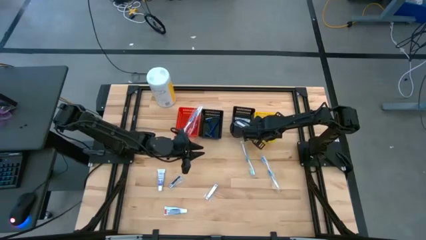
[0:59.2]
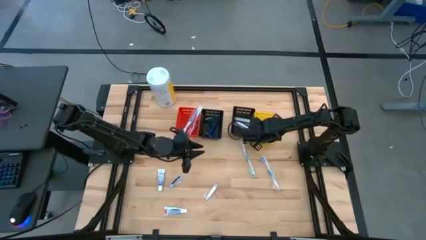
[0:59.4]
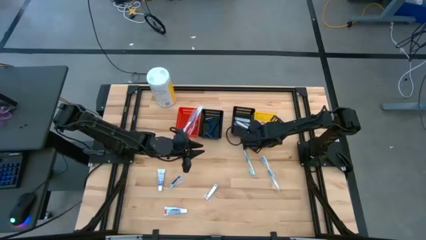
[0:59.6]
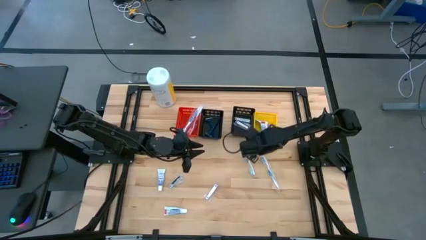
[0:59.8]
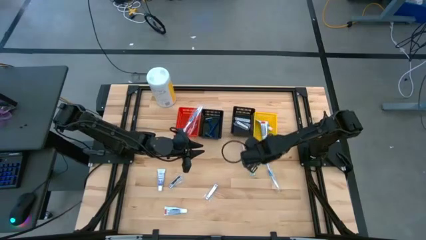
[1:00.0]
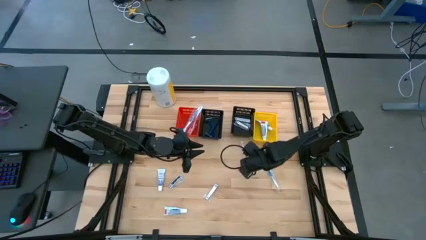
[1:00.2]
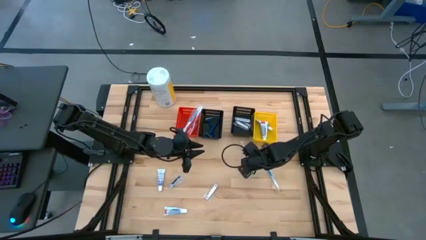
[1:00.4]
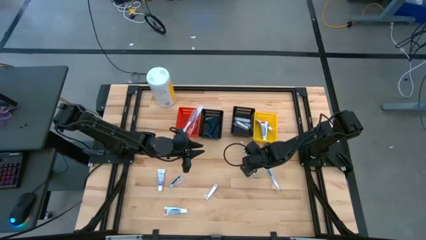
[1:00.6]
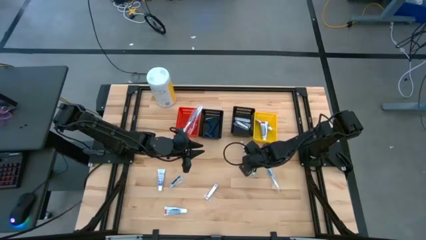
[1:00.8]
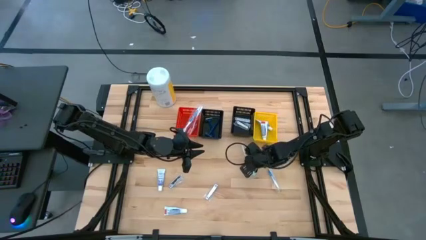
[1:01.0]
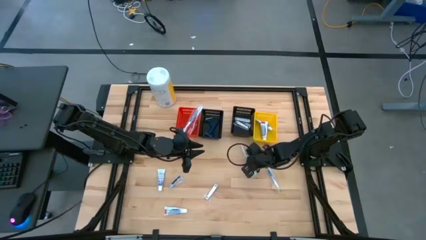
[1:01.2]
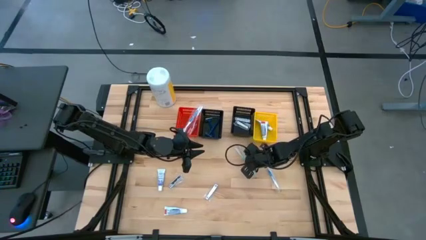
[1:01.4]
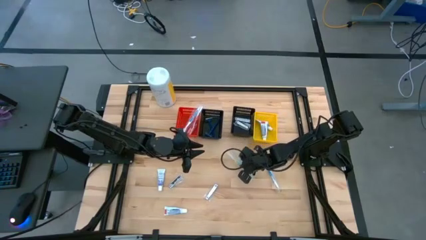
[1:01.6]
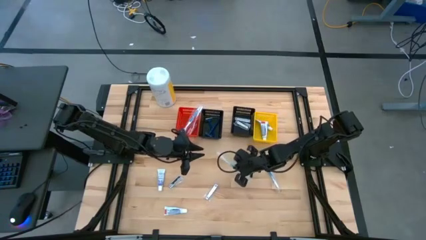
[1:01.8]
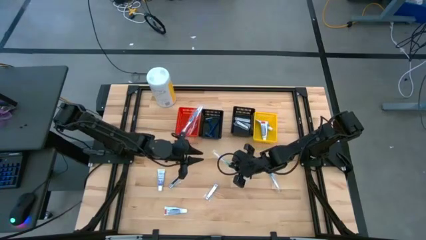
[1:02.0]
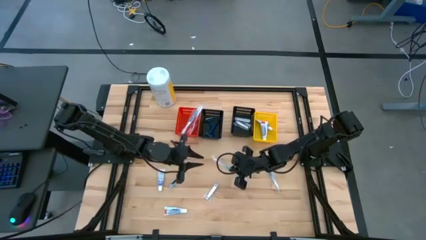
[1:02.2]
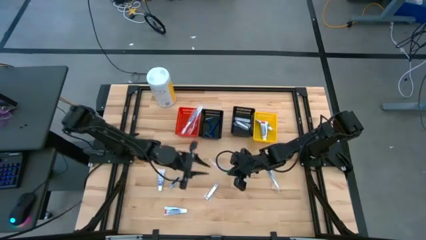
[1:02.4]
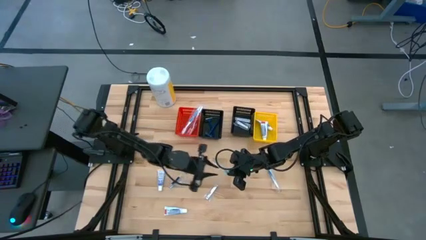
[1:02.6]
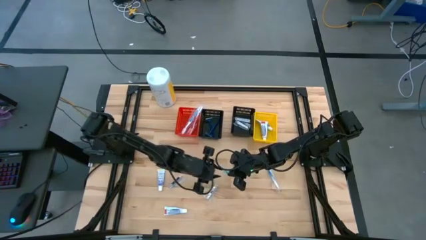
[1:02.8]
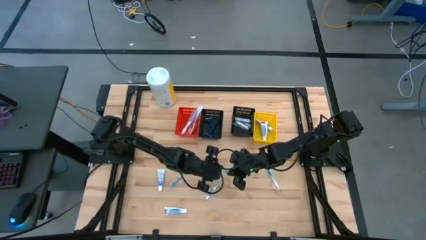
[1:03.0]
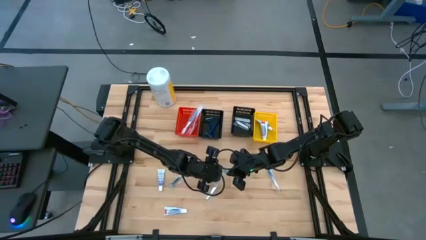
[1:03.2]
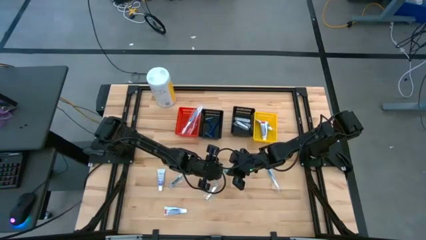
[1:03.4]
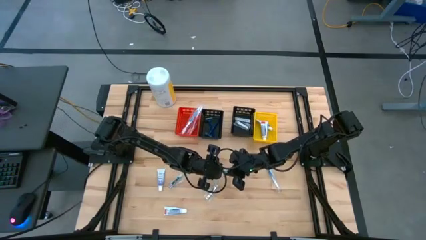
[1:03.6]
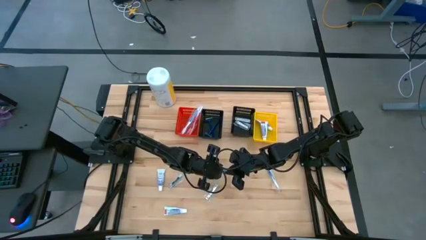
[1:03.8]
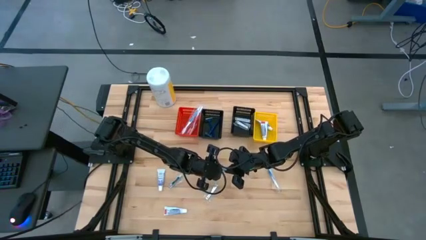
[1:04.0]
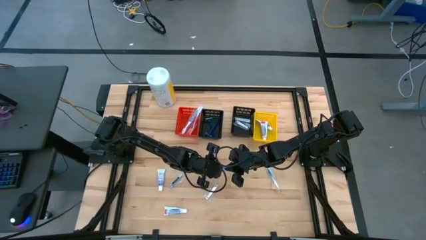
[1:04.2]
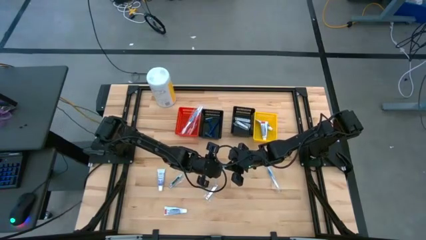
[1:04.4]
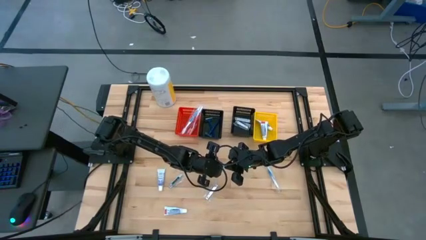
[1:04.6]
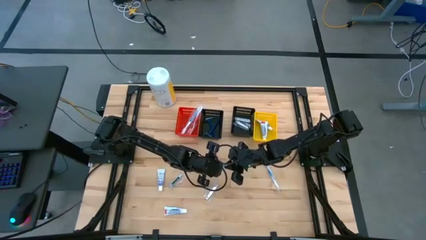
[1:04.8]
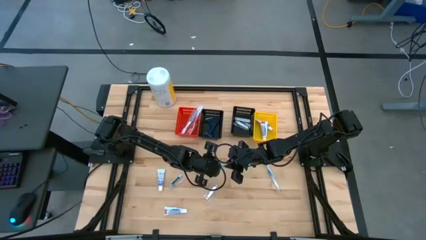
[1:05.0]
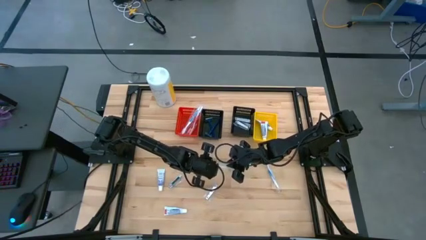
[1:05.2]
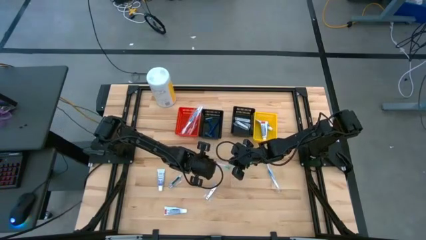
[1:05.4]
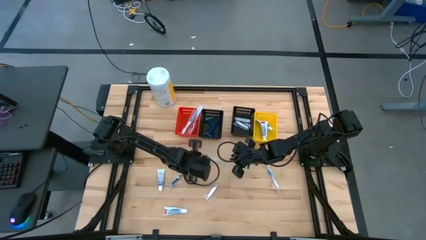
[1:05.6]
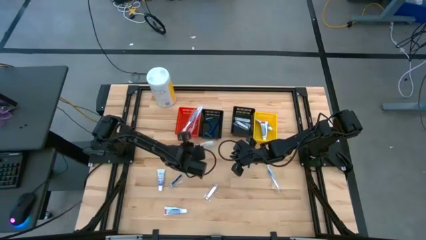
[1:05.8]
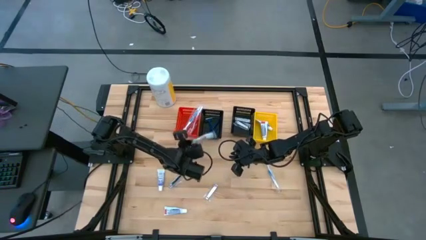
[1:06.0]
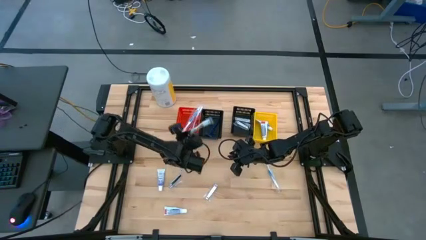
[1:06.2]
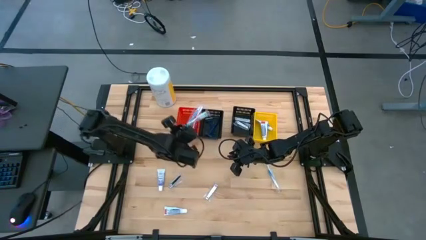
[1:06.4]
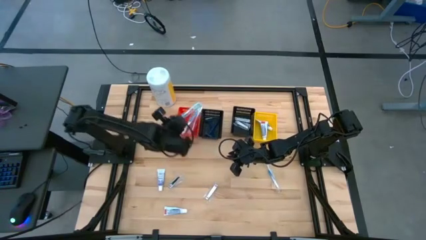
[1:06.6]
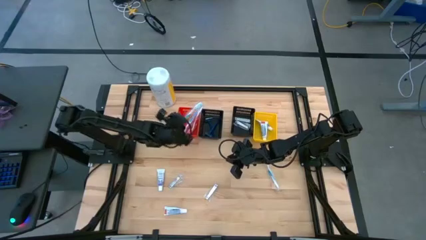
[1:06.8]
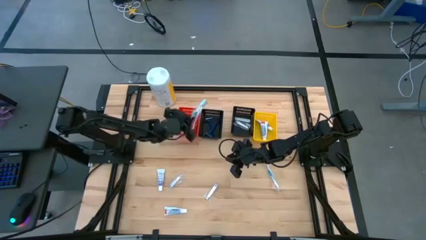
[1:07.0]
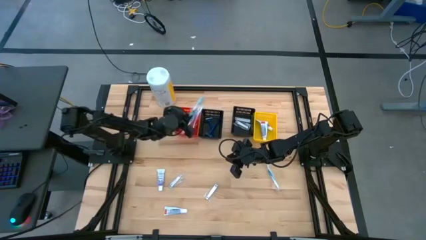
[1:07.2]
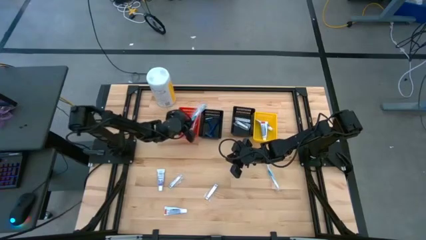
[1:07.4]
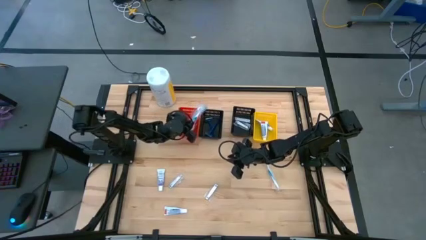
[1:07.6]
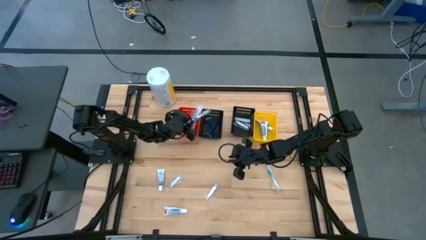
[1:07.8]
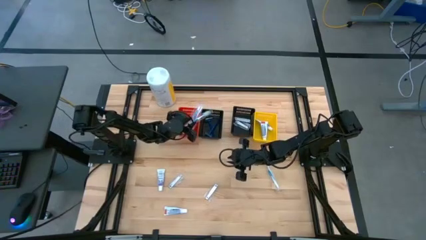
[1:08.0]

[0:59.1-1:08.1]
Task: Pick & Place Travel size toiletries
Put the green toothbrush into the red basket

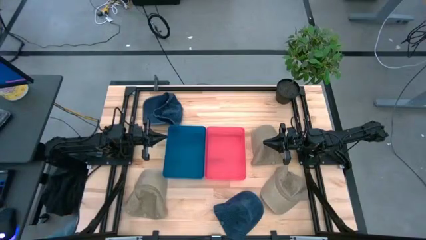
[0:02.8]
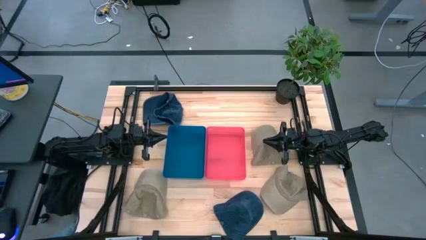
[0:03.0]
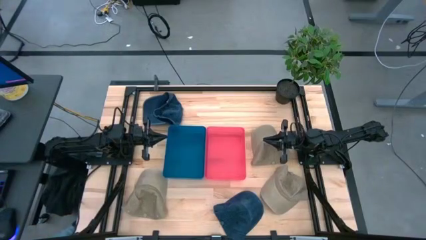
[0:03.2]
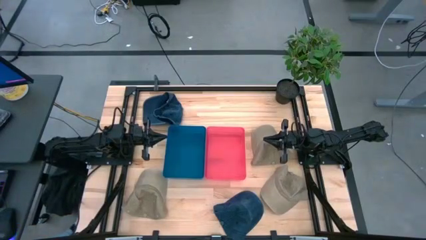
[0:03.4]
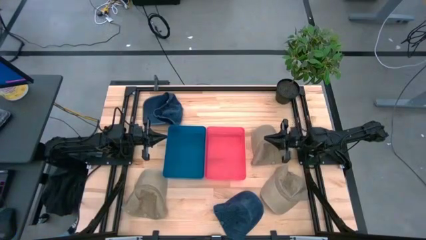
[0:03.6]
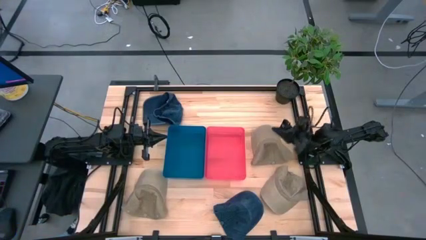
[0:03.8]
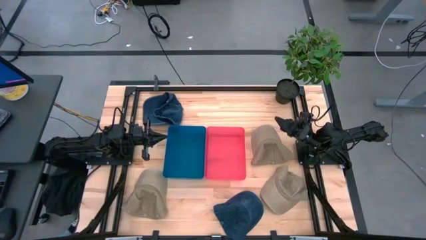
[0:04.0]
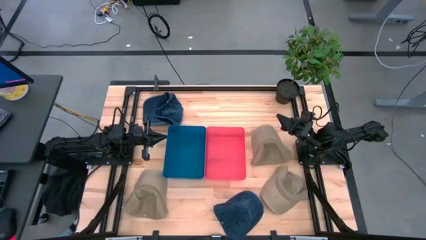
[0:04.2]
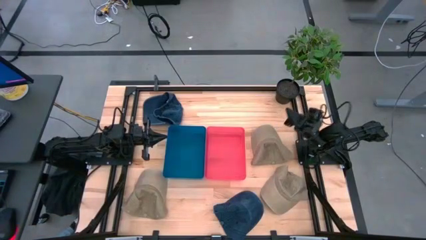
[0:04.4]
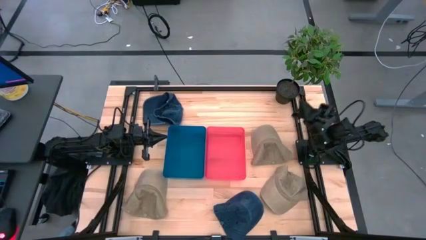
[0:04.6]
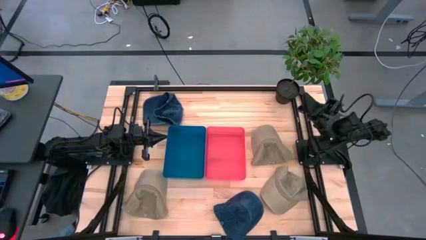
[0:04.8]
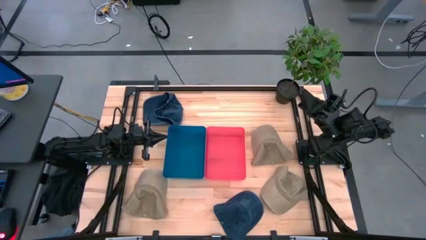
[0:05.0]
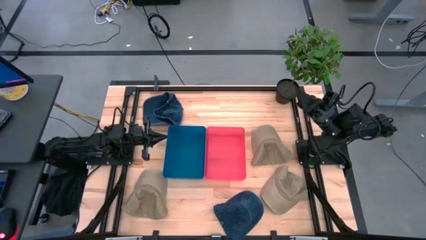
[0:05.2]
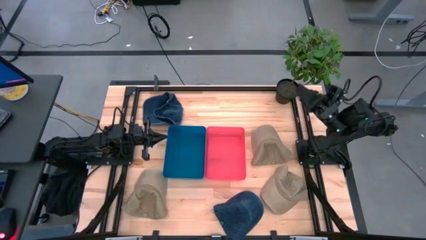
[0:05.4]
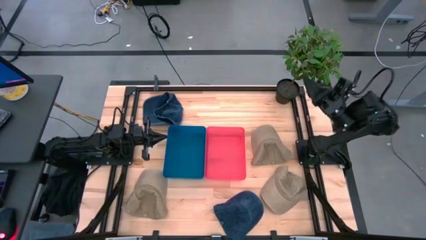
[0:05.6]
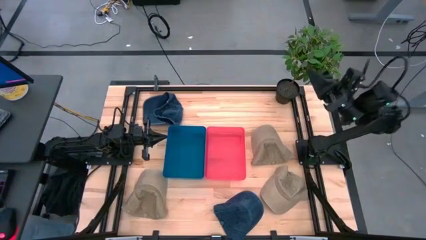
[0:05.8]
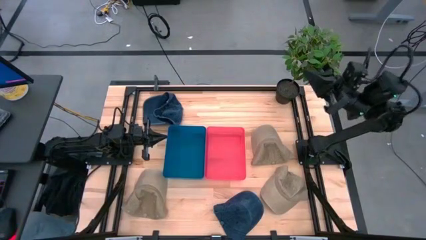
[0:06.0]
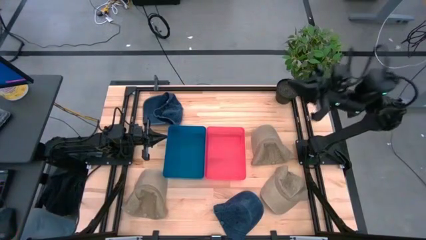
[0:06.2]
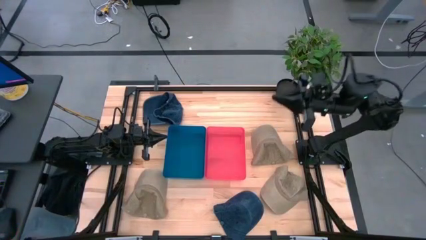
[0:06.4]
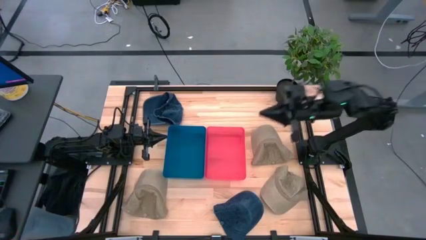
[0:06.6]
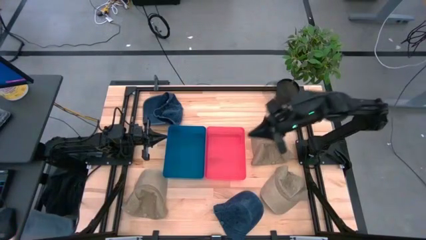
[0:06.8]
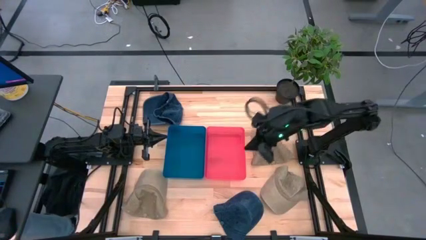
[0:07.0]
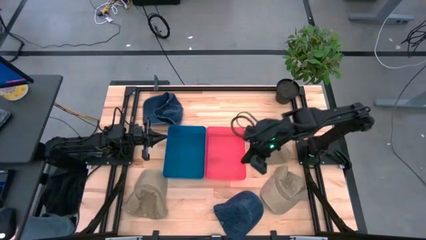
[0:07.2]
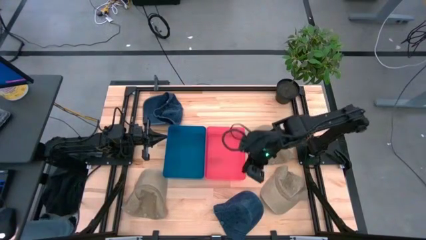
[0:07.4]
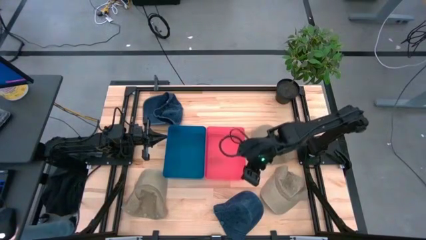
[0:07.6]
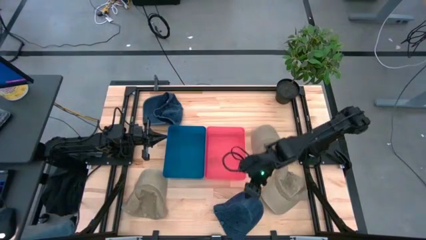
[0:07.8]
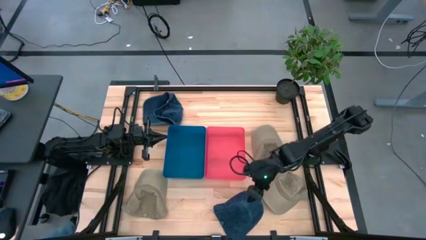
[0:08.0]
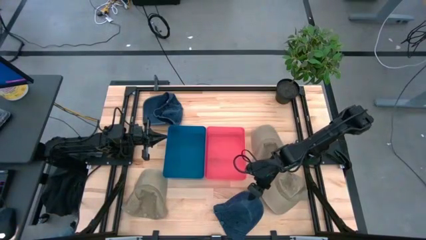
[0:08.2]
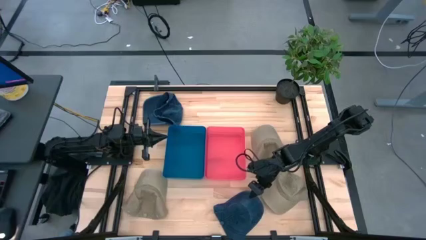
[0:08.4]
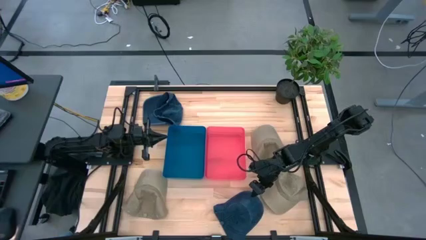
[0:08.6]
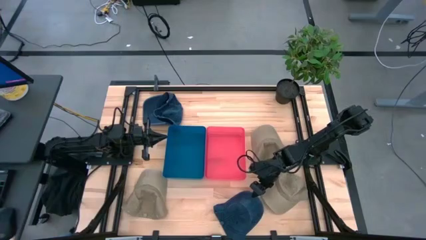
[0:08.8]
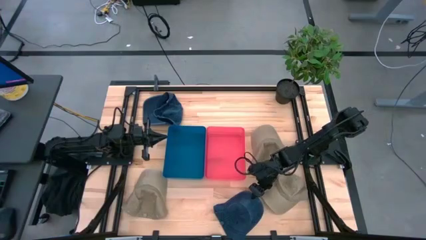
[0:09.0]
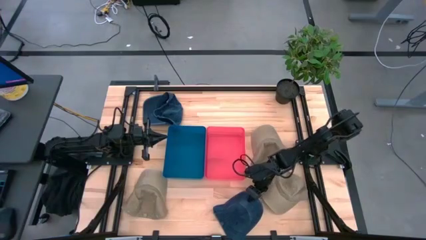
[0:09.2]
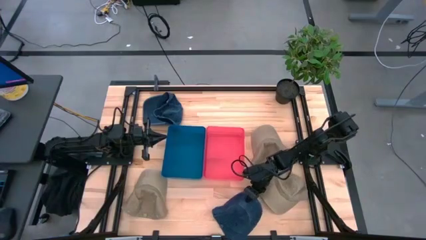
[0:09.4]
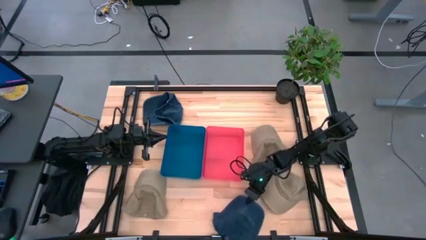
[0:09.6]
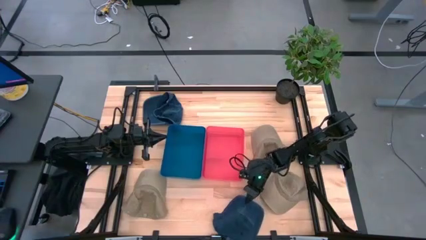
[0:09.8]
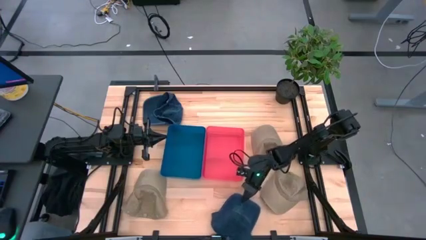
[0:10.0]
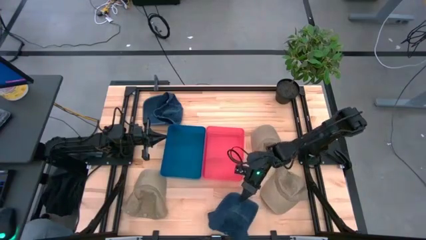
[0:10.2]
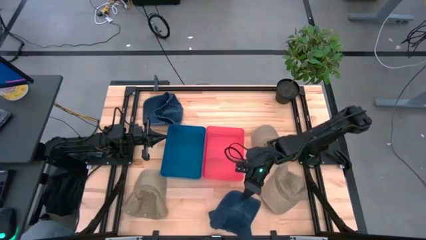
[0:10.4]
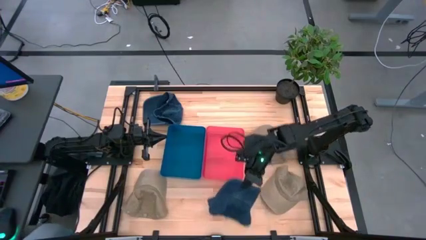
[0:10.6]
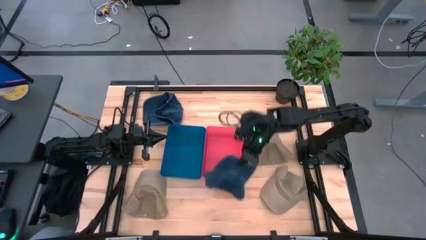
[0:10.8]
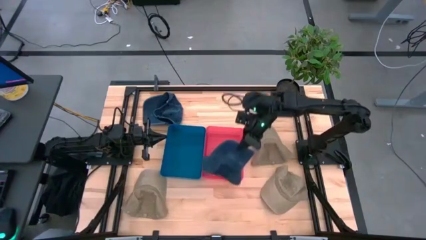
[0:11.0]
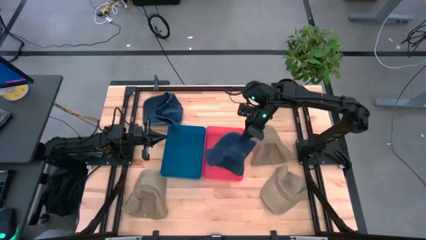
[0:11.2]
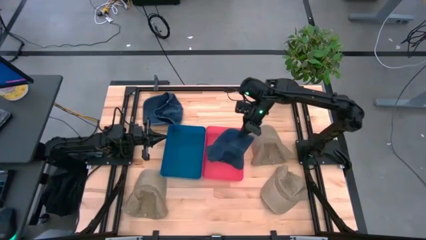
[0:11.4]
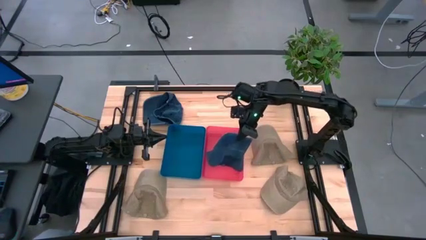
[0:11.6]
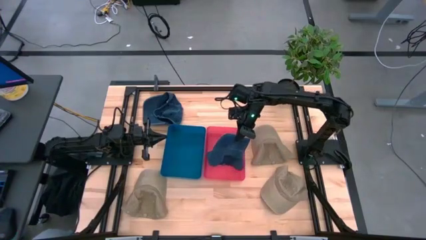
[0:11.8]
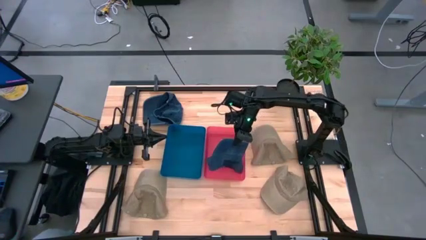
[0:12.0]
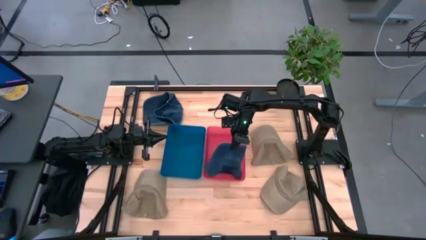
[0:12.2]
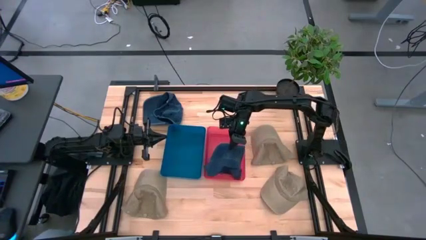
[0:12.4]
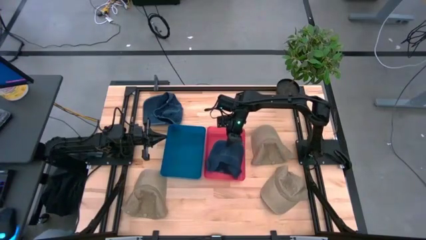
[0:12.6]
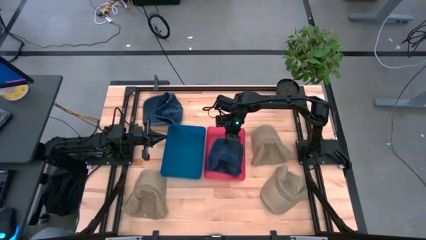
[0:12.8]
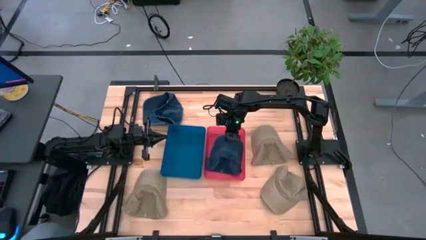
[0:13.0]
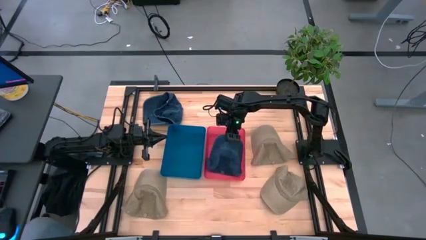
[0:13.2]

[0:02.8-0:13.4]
Task: Pick & Place hat
Put the bottom blue cap into the red bin
